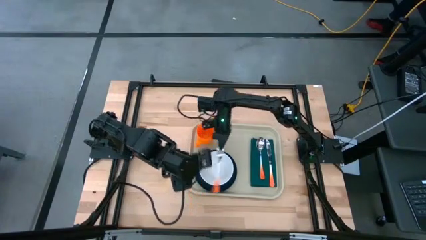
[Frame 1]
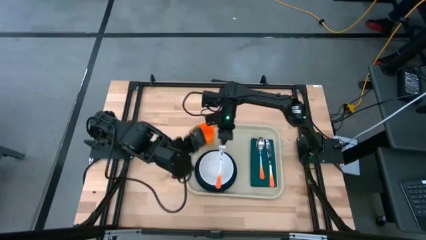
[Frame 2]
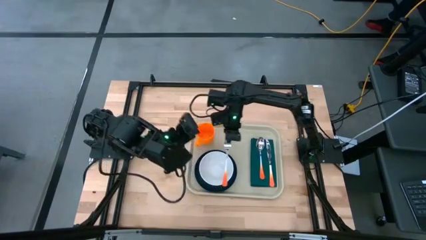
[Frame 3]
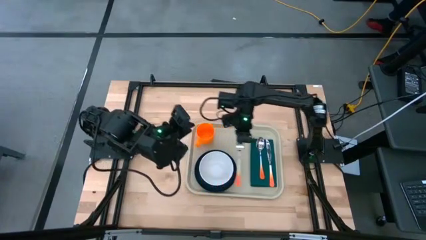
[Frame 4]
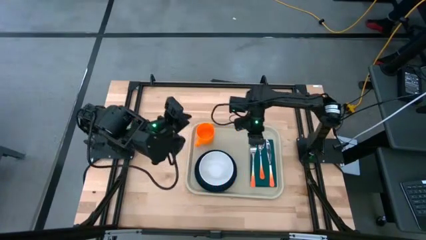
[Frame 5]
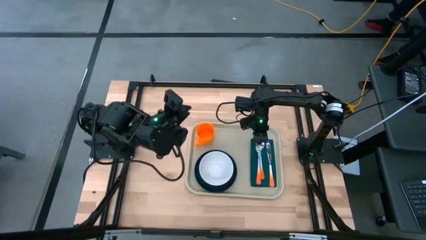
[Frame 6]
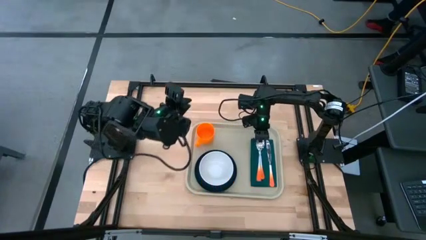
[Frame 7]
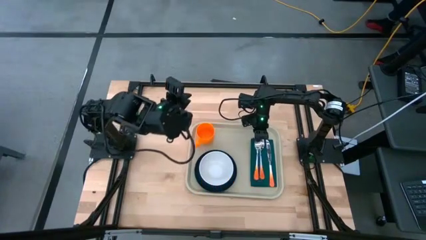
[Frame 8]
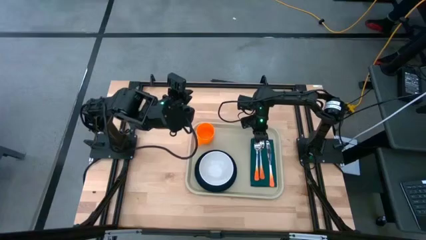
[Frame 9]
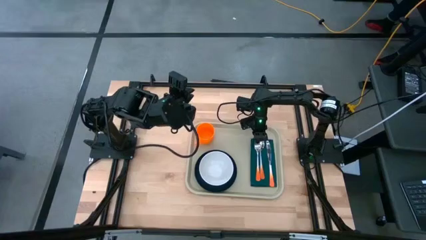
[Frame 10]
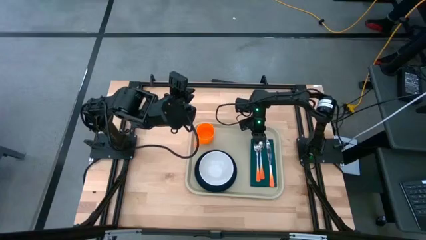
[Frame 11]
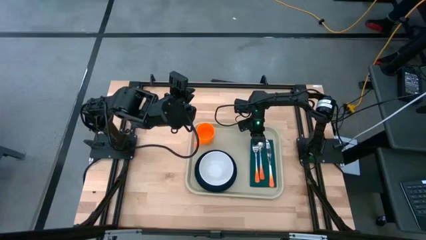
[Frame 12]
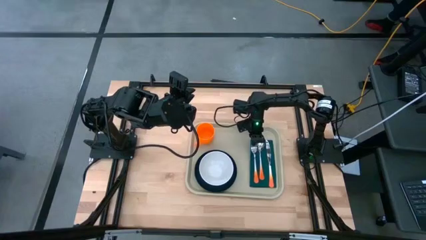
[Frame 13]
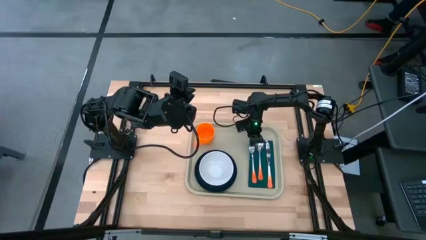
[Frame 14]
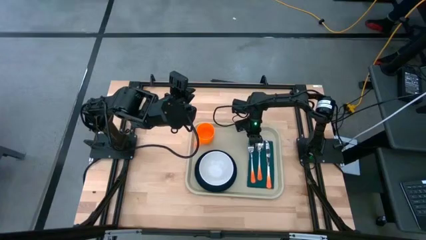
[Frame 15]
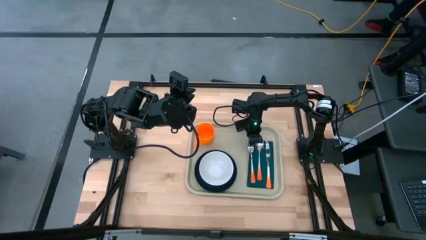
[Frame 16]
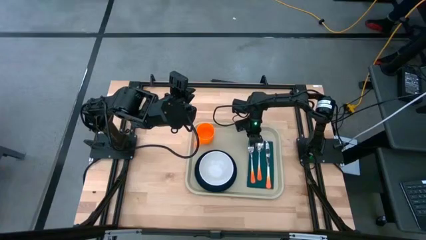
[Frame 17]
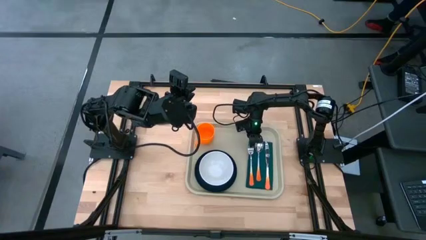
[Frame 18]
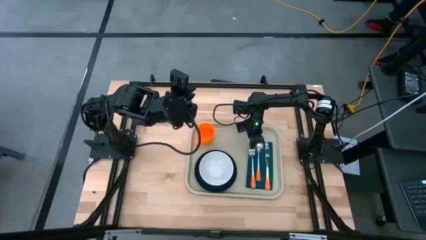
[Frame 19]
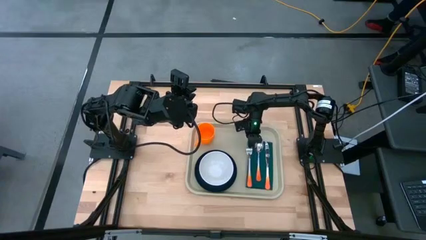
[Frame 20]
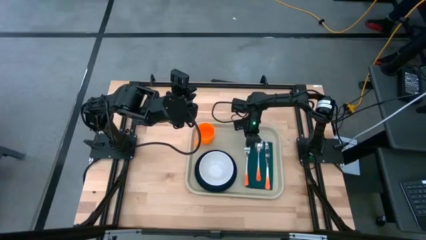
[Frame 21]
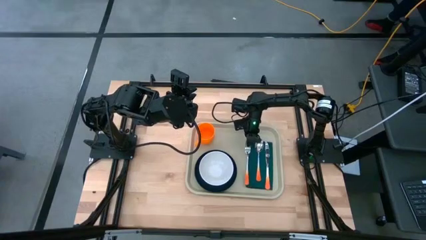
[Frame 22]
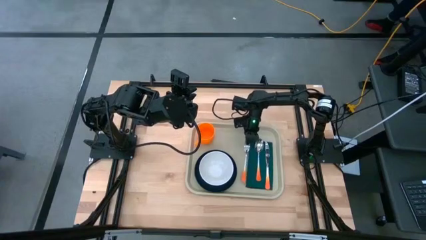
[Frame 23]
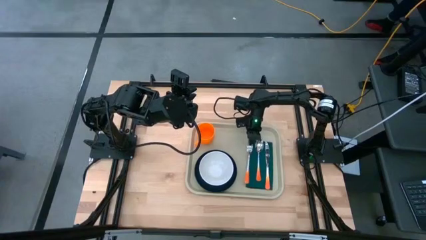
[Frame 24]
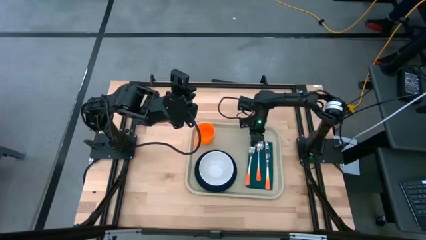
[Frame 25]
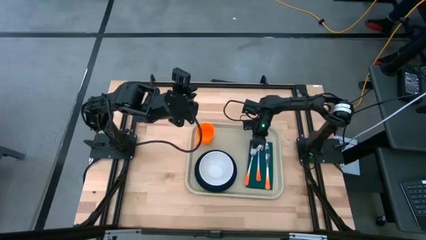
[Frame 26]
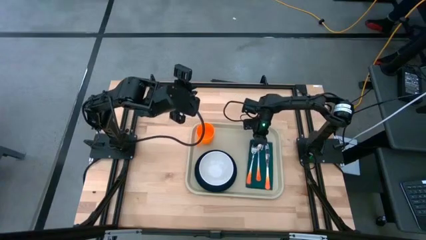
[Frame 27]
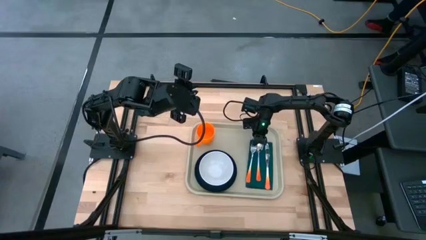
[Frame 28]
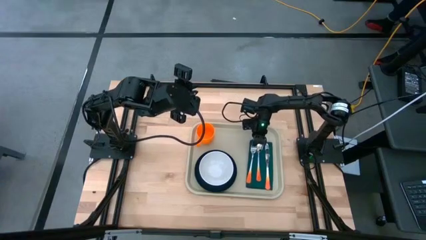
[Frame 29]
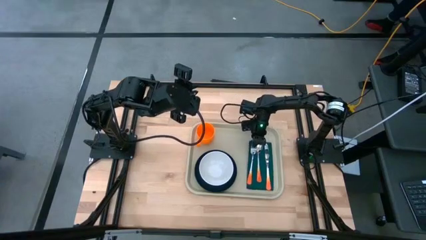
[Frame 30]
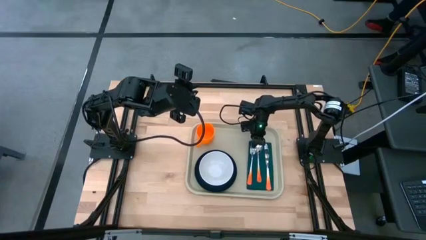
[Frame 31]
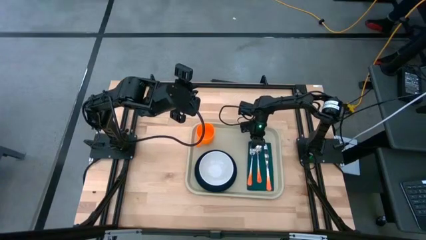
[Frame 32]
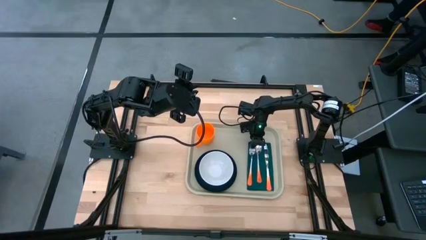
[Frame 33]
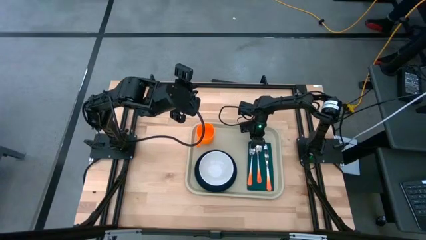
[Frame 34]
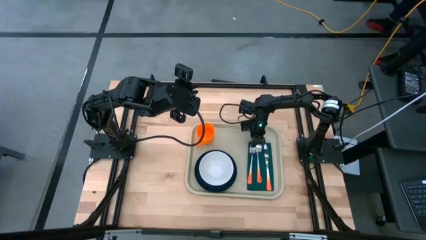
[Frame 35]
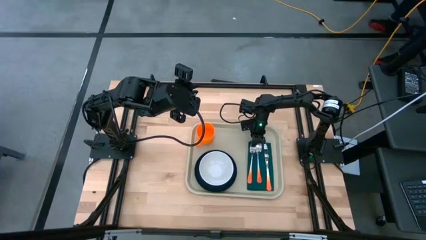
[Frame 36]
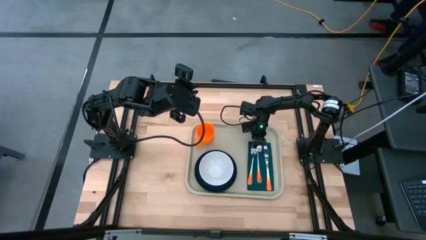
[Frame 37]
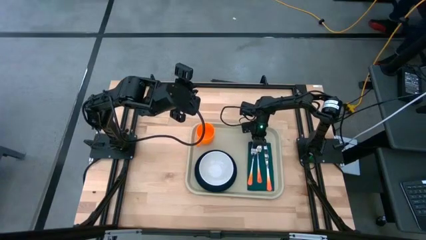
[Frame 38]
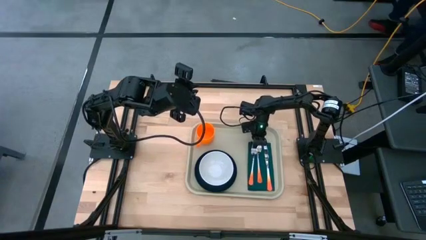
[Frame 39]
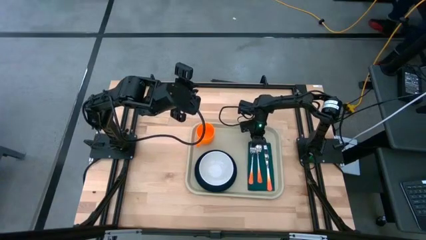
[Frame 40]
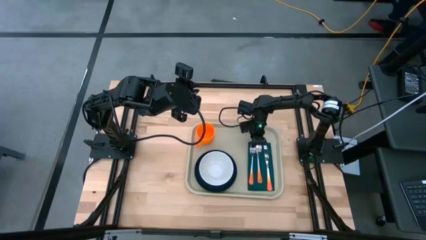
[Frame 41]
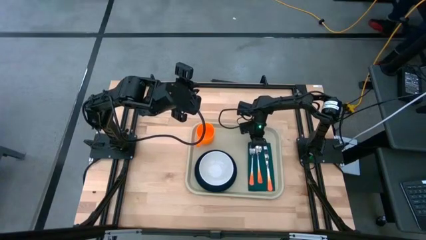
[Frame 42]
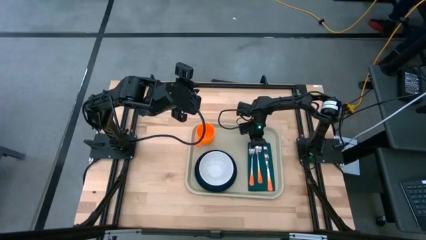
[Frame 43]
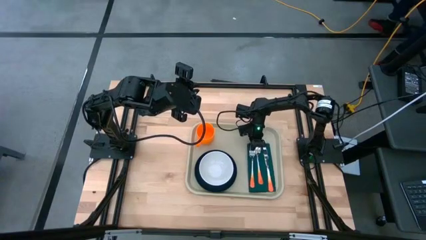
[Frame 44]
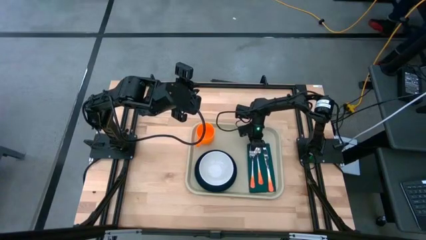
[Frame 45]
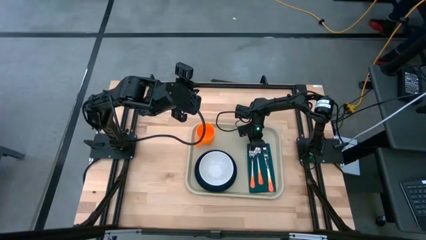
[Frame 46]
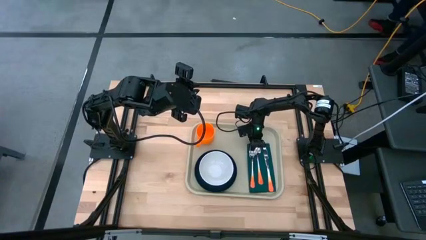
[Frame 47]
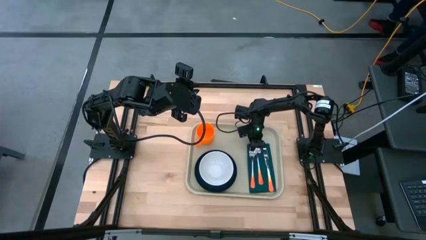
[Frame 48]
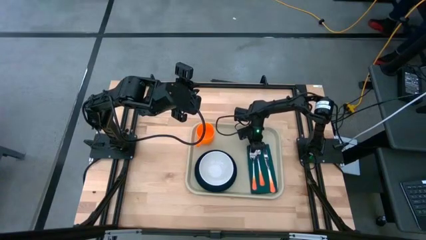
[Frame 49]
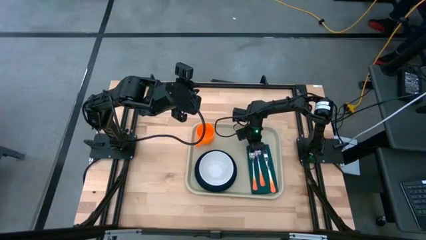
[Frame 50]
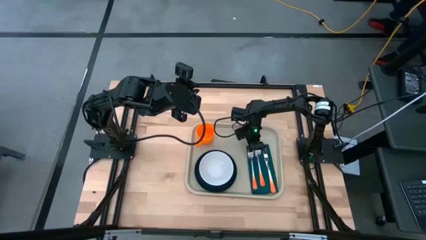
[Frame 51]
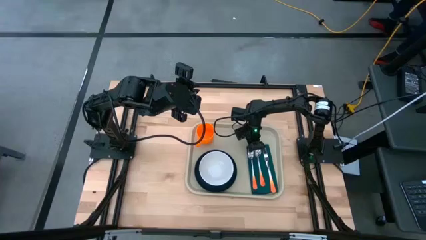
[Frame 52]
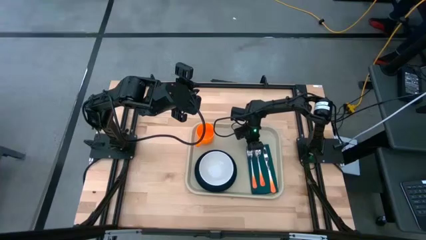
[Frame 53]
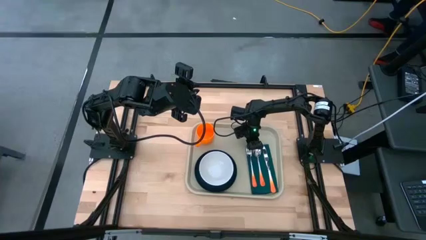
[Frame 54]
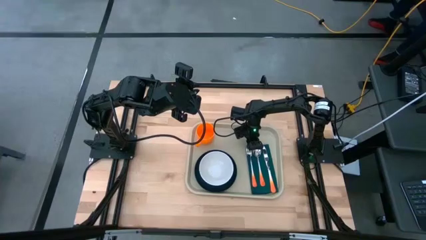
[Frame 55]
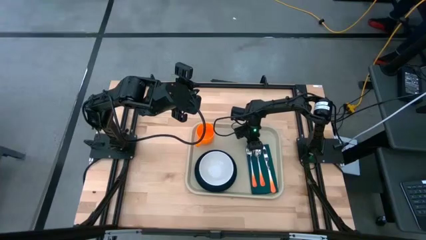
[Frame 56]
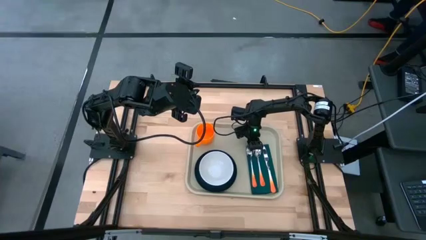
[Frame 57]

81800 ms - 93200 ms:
Task: Set up tray
Put the orange fork on the green napkin to the left of the orange spoon

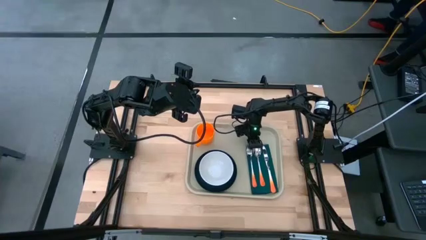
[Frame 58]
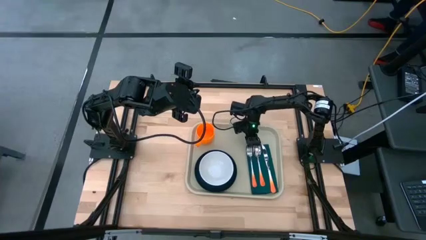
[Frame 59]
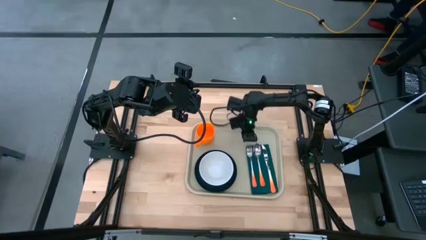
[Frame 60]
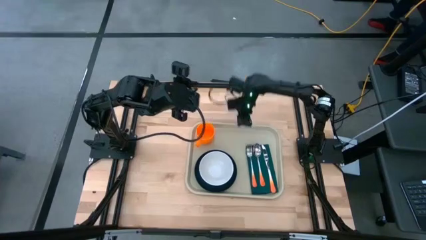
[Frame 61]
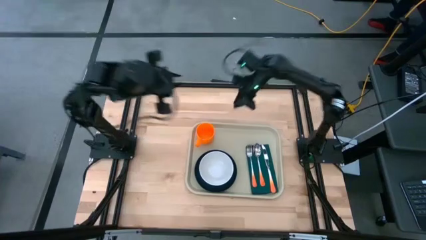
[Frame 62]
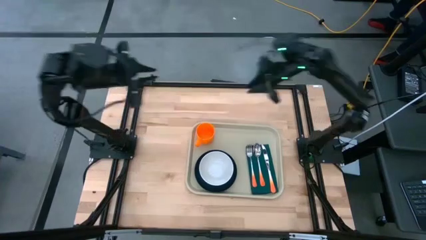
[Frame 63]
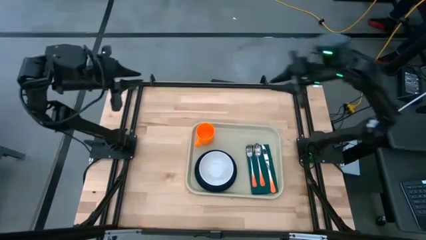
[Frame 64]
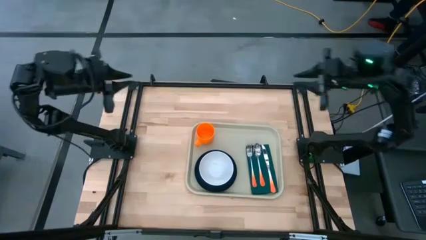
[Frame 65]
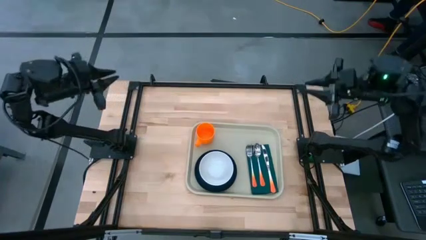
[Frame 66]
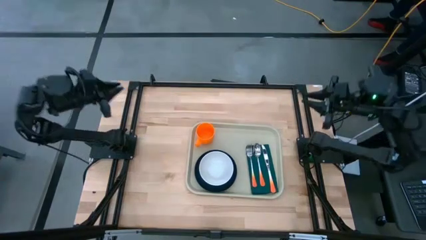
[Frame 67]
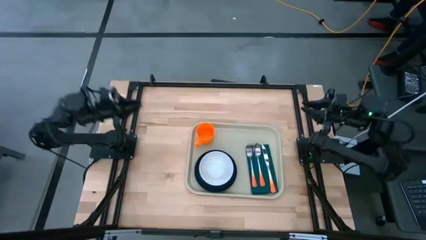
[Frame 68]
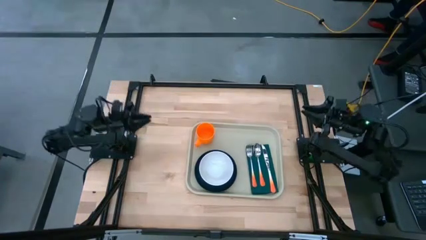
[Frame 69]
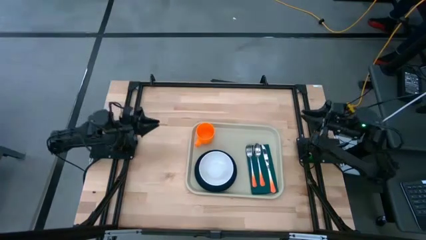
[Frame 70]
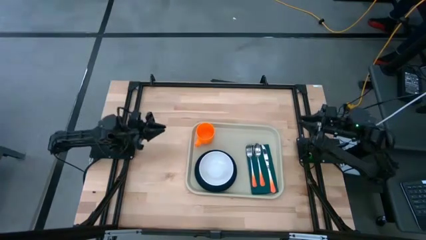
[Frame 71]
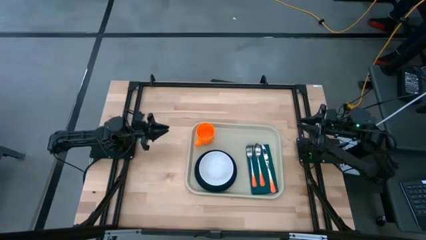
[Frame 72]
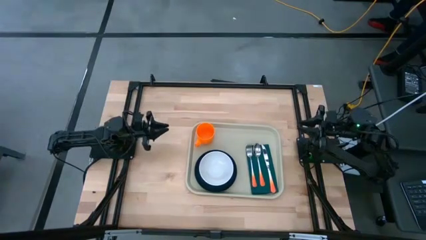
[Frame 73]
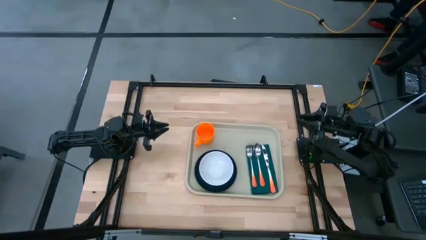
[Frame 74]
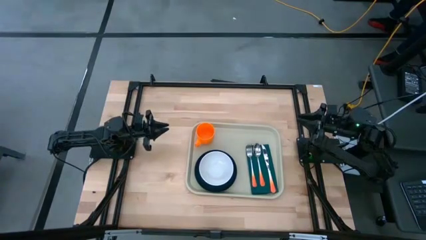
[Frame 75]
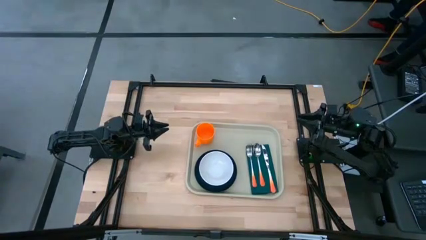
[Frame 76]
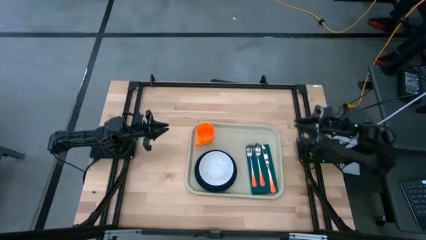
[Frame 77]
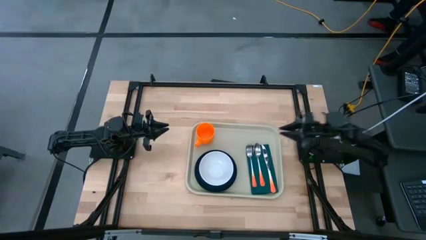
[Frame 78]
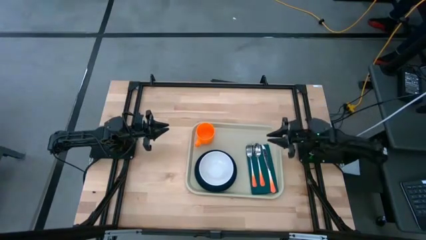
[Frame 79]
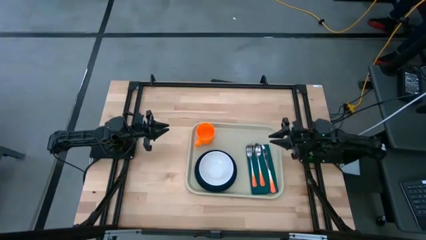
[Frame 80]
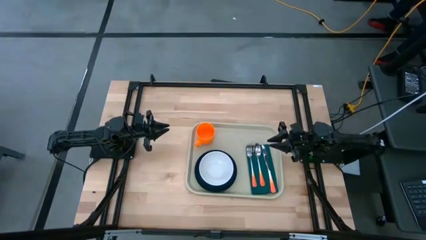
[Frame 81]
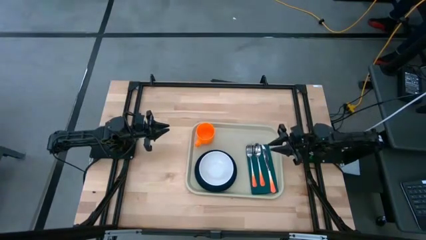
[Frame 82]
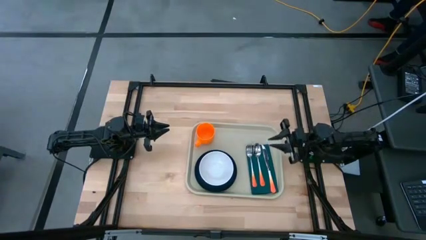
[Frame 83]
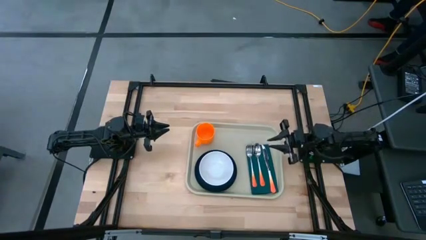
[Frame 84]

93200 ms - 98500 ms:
Return to Home Position

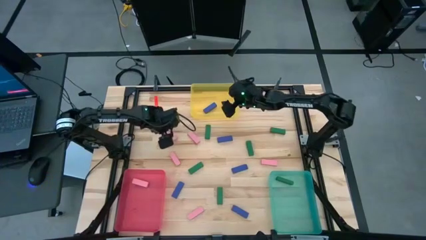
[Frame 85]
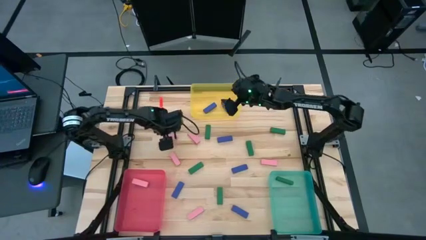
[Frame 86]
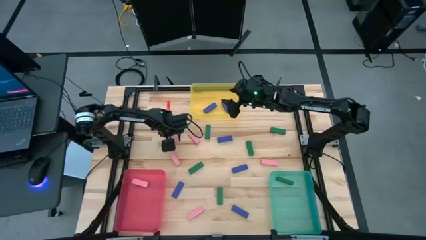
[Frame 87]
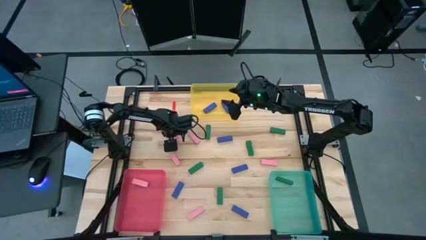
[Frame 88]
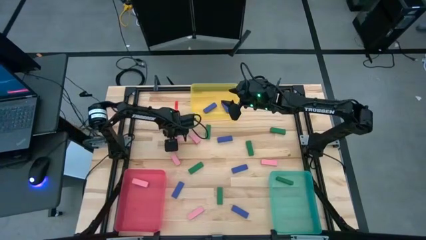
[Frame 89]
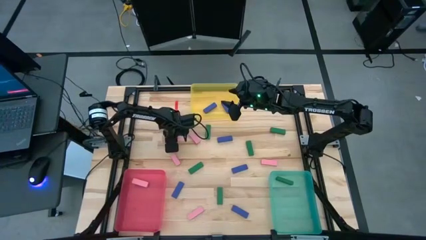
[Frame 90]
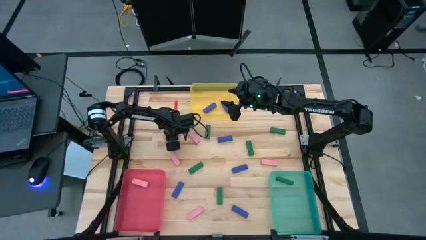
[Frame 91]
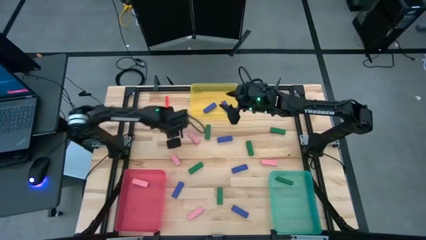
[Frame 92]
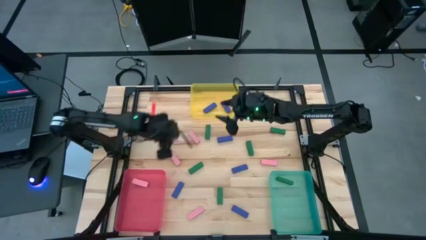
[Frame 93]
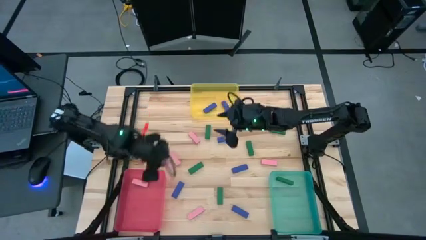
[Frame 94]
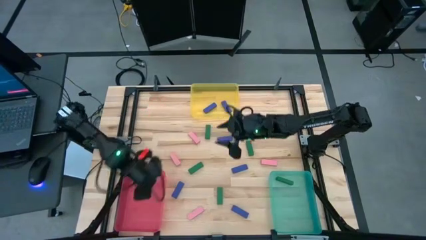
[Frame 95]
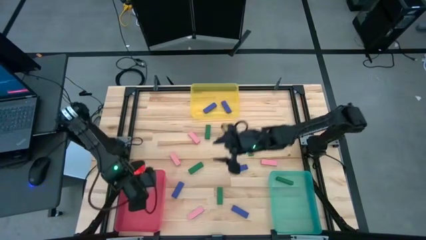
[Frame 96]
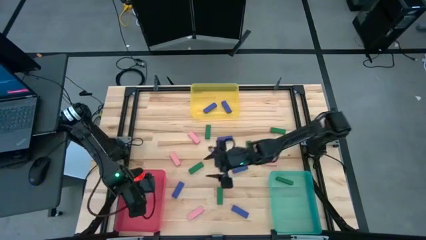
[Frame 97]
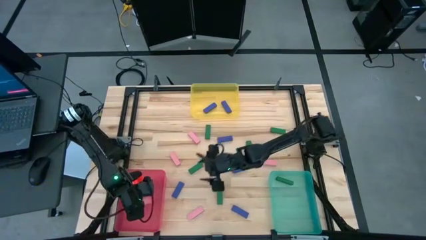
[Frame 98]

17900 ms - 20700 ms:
Task: Sort blocks
Put the pink block into the red bin
